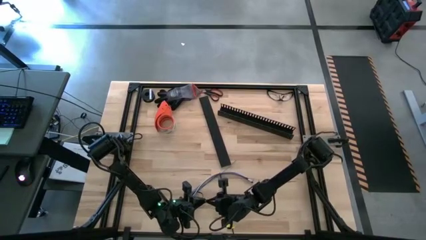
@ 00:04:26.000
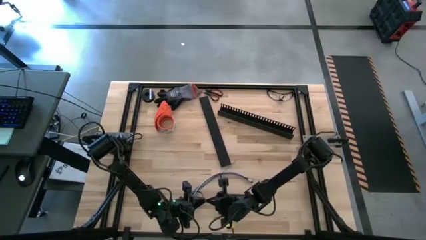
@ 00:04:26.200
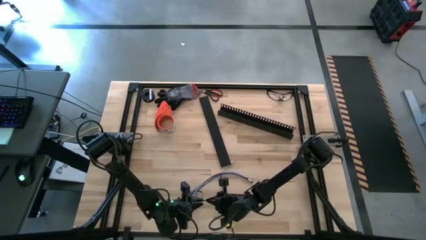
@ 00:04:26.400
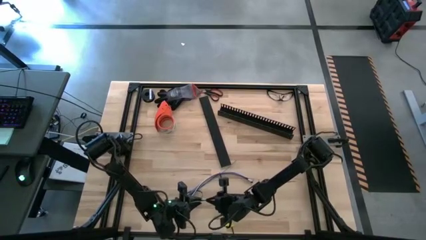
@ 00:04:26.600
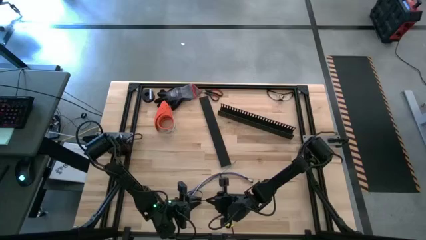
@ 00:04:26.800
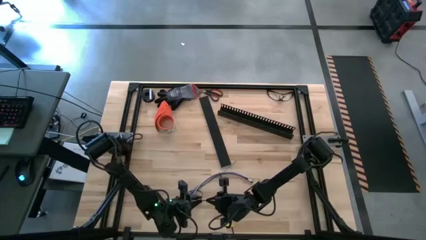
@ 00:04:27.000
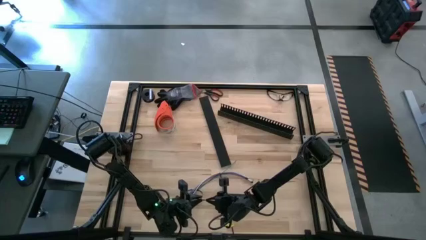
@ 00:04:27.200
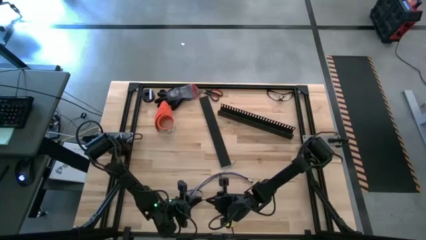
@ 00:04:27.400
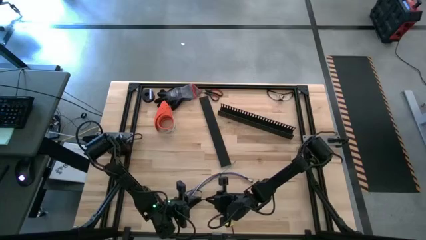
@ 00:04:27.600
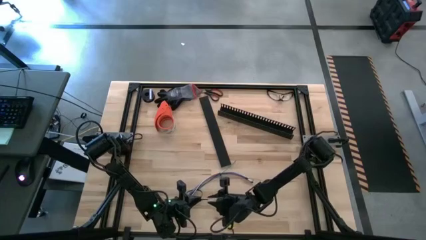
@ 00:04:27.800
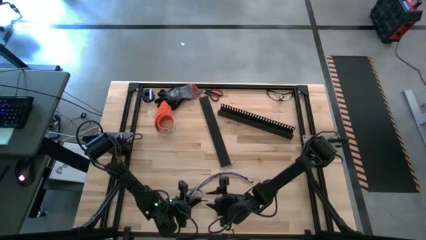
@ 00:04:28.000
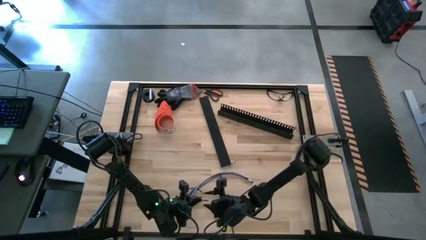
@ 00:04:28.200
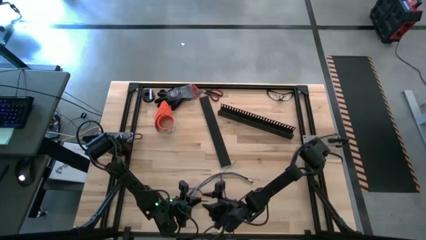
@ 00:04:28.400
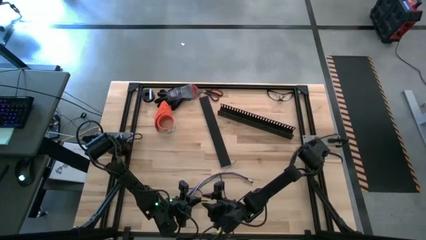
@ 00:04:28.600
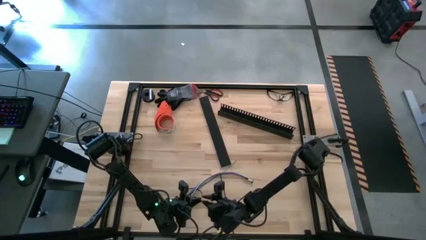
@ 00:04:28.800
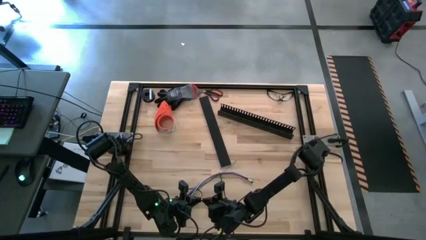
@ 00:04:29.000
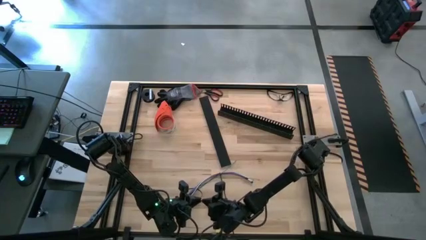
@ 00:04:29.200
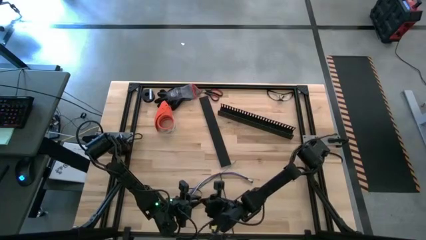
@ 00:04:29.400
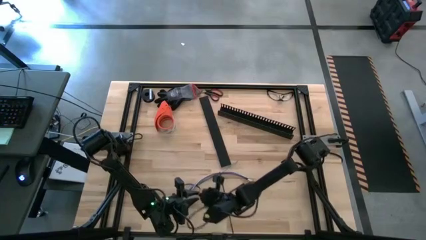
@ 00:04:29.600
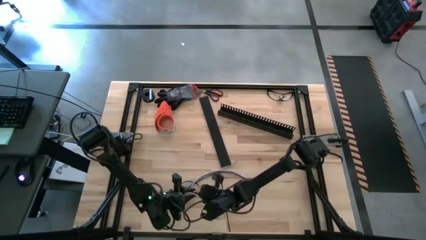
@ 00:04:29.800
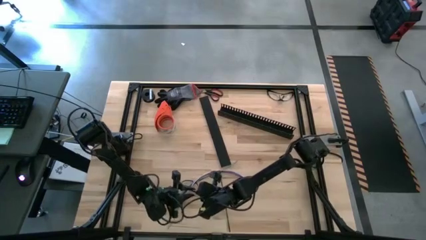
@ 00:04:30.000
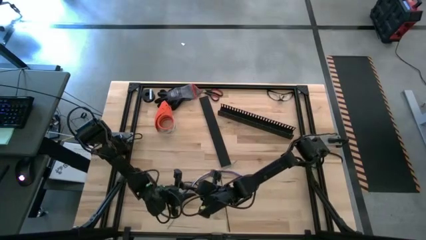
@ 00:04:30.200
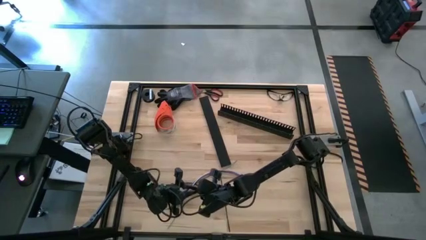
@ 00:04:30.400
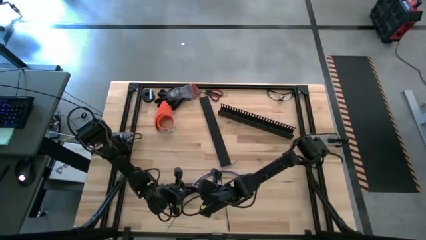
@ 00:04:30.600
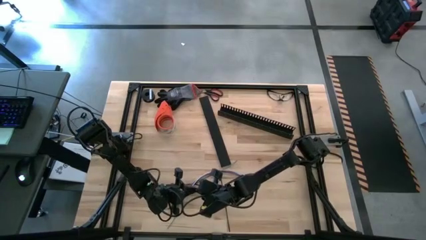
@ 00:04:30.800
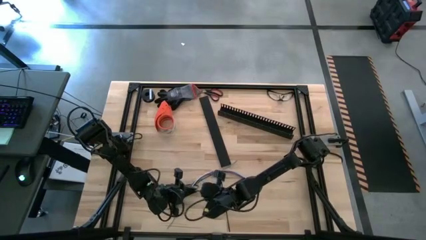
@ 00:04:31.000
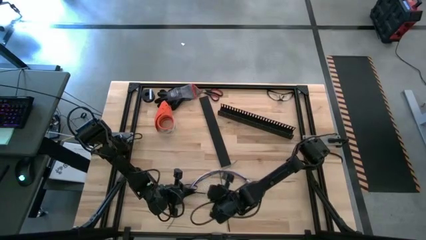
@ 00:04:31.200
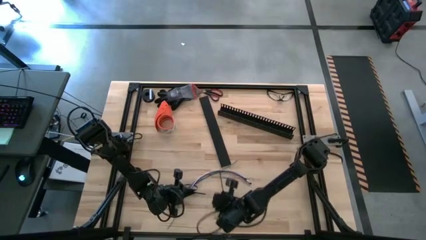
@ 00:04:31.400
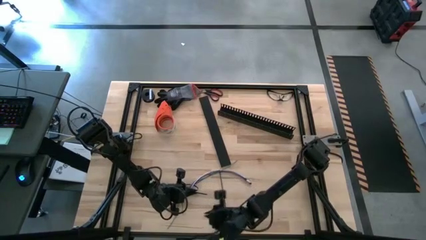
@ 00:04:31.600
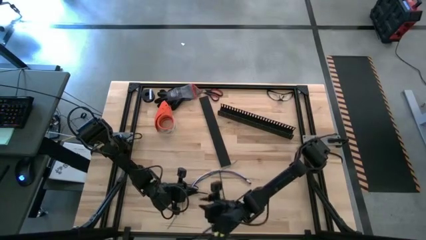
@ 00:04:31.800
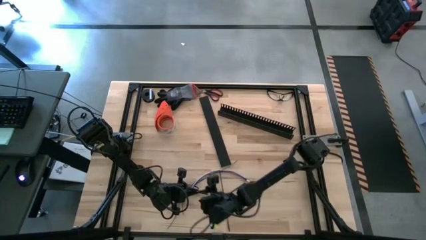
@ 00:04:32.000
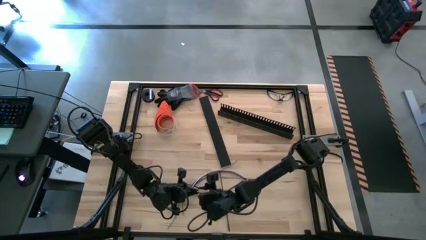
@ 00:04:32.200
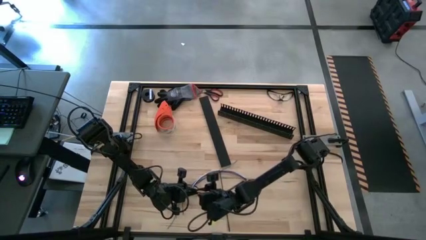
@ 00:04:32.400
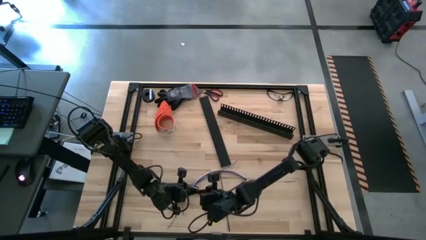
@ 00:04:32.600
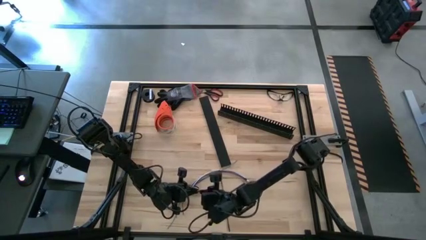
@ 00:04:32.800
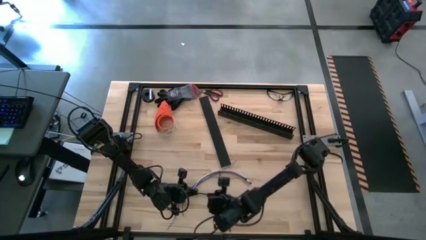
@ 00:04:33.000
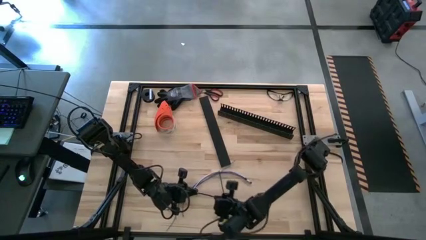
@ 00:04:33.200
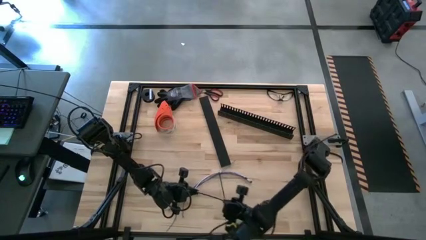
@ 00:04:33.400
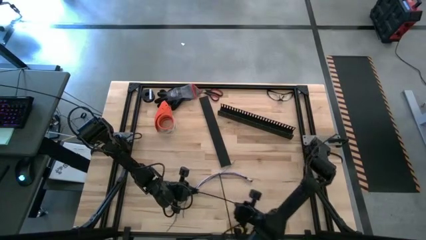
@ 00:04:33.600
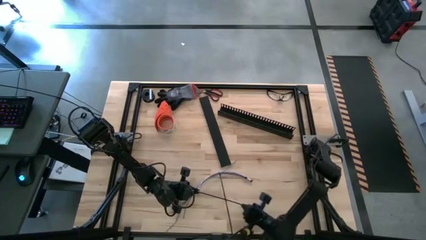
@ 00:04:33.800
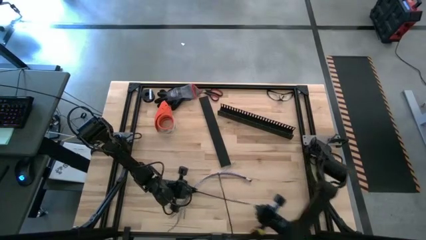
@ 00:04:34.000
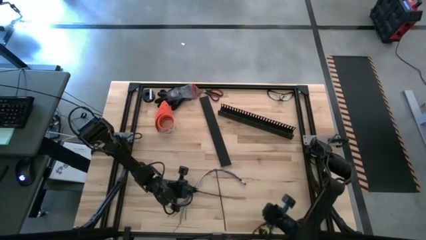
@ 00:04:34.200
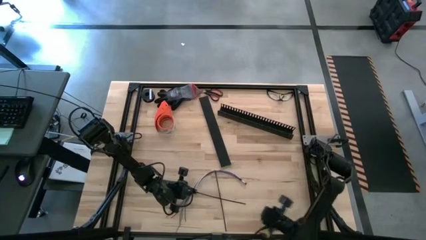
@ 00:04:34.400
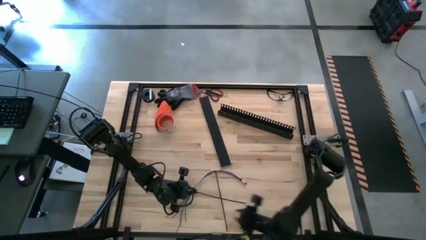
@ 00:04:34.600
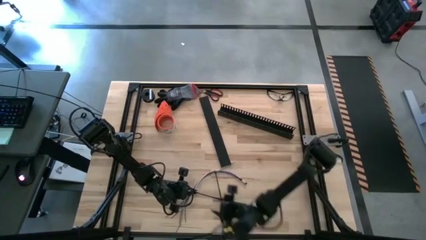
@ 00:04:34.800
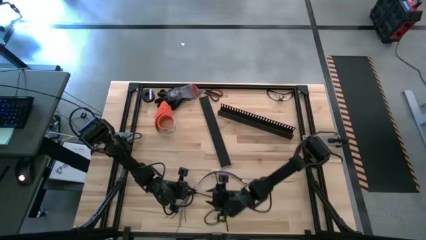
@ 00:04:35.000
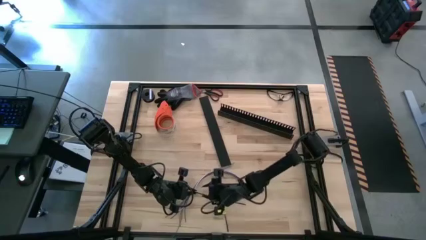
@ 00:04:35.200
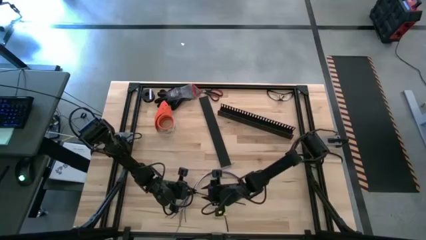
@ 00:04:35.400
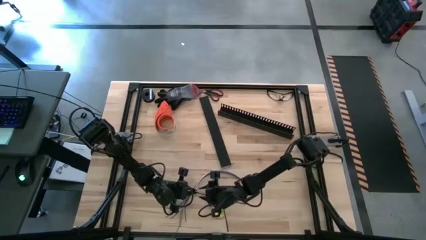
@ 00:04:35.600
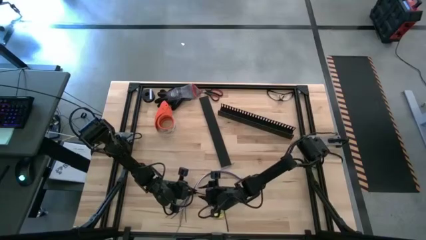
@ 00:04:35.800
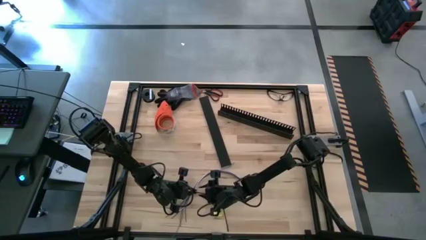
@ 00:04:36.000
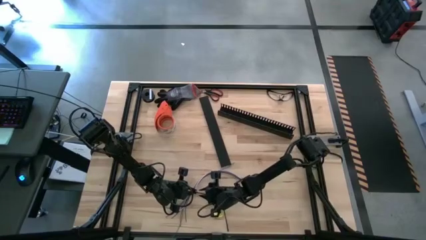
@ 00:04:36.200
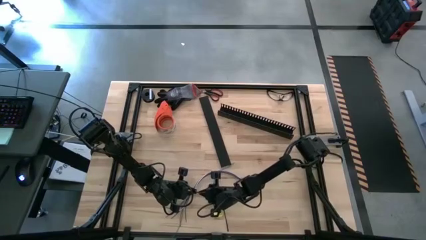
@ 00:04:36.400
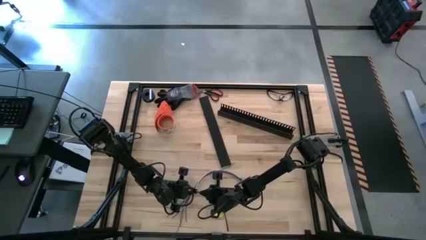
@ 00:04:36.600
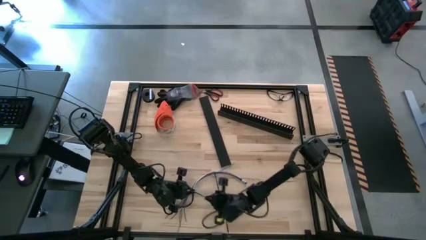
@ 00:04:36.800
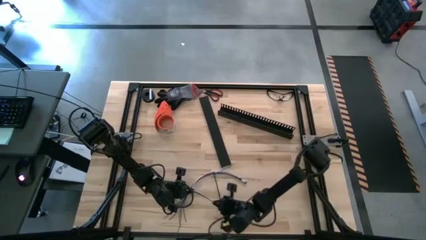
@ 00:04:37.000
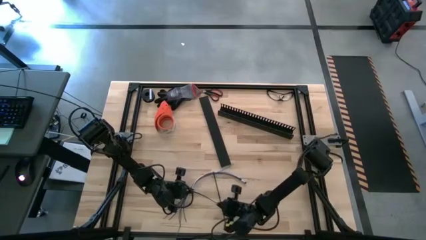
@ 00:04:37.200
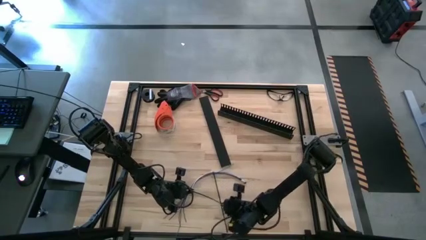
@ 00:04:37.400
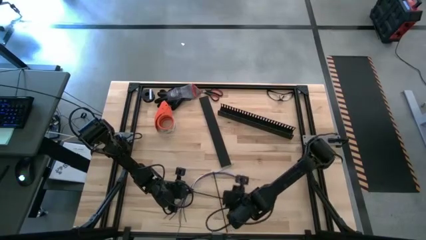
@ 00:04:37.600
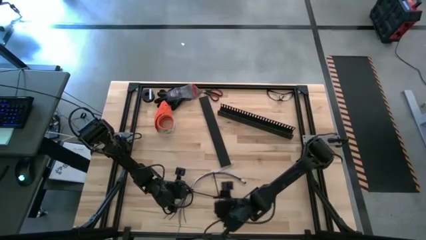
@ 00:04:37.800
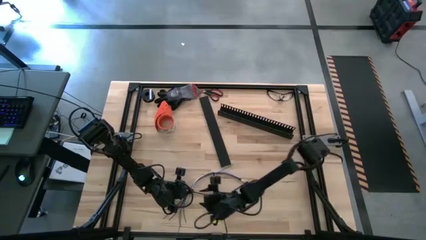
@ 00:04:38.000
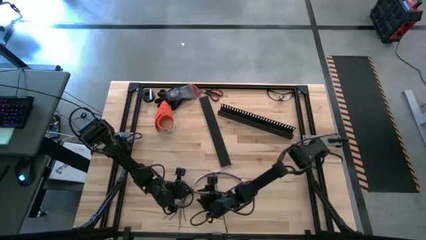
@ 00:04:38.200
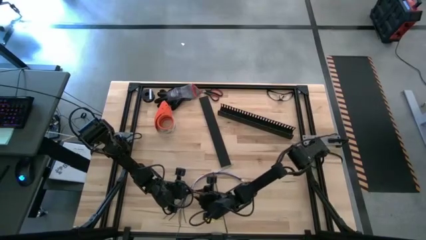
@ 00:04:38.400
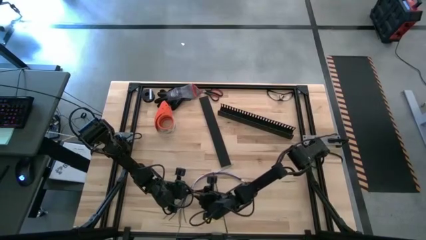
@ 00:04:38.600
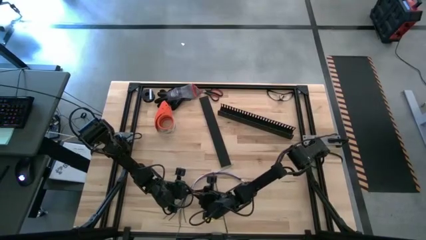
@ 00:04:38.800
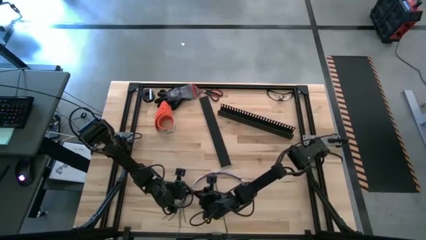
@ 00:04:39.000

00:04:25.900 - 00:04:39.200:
Task: Ziptie cables
Wrap the black zip tie on the cable
